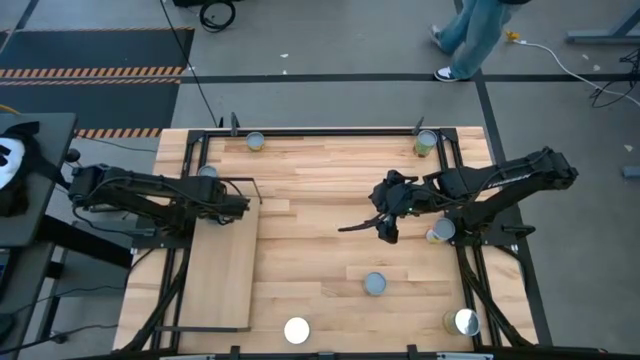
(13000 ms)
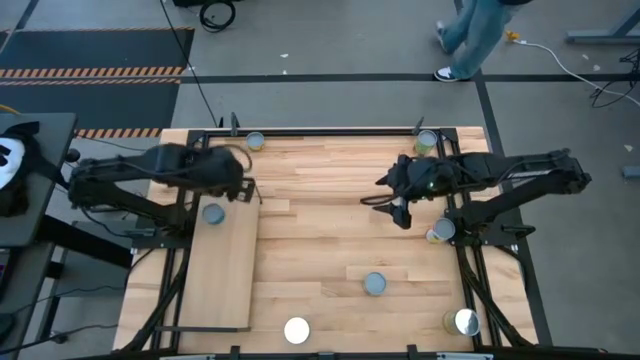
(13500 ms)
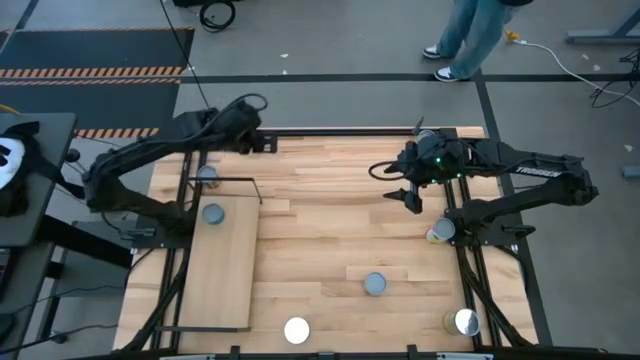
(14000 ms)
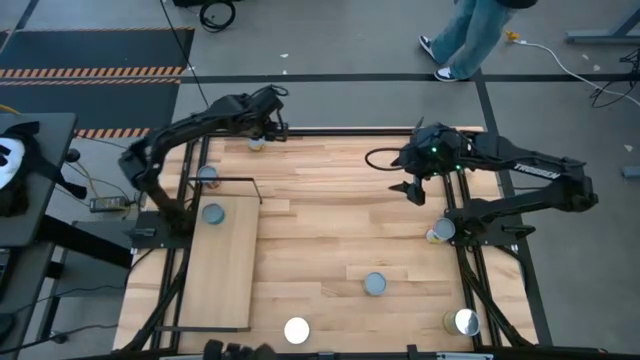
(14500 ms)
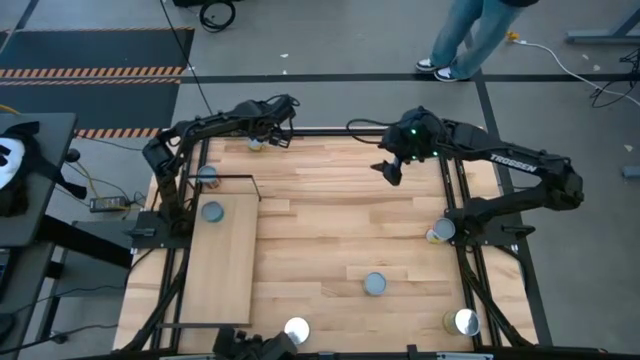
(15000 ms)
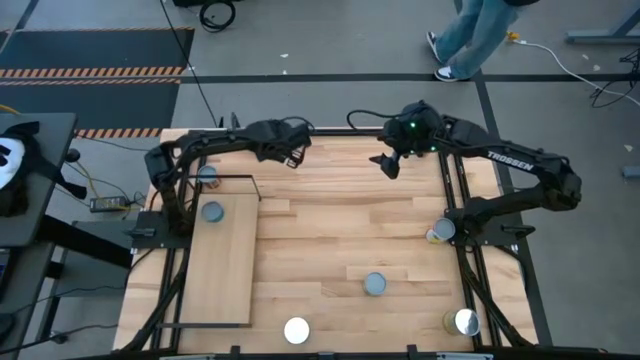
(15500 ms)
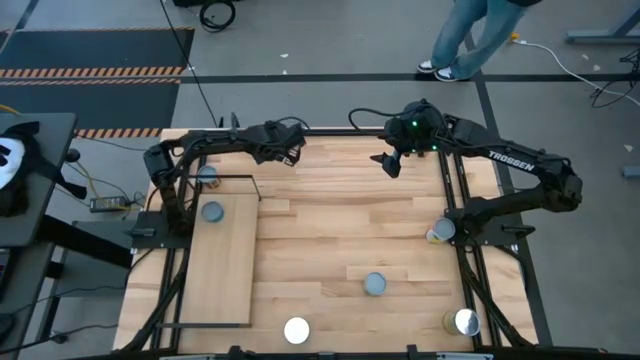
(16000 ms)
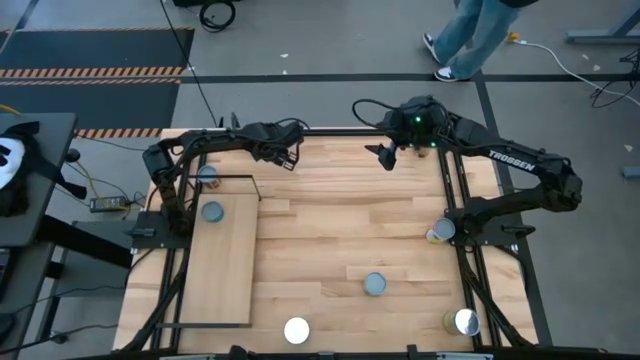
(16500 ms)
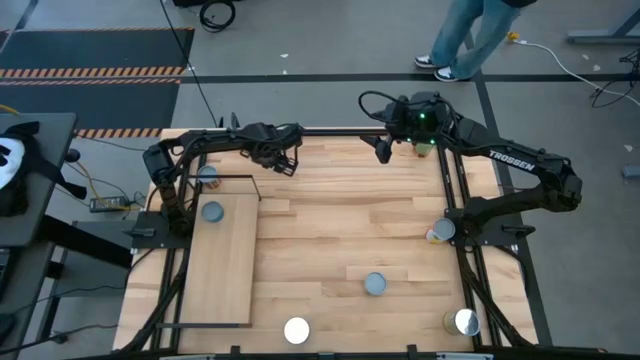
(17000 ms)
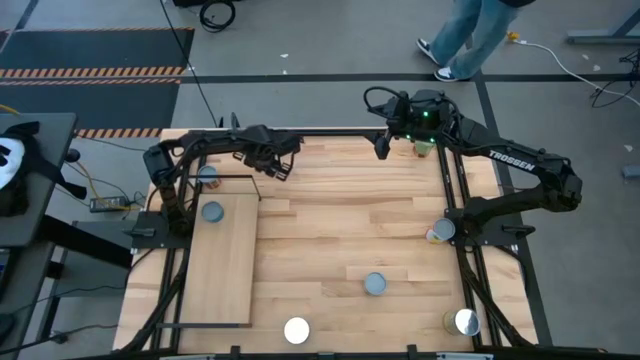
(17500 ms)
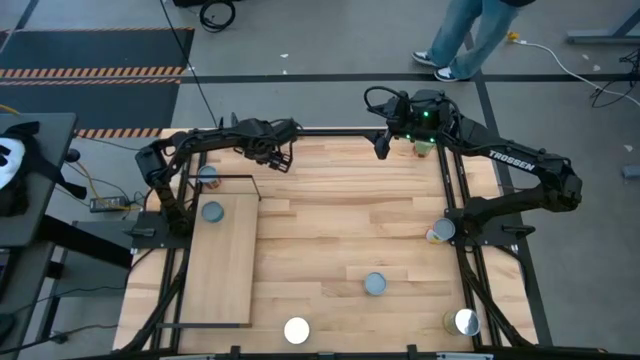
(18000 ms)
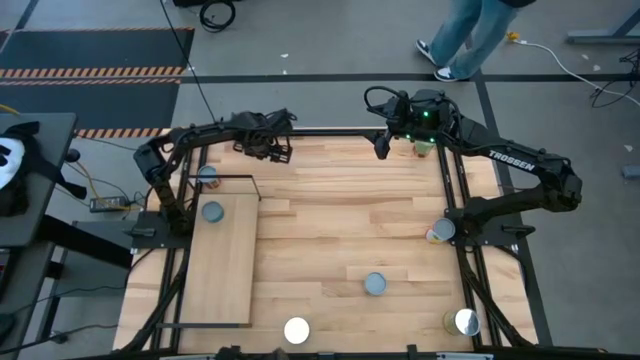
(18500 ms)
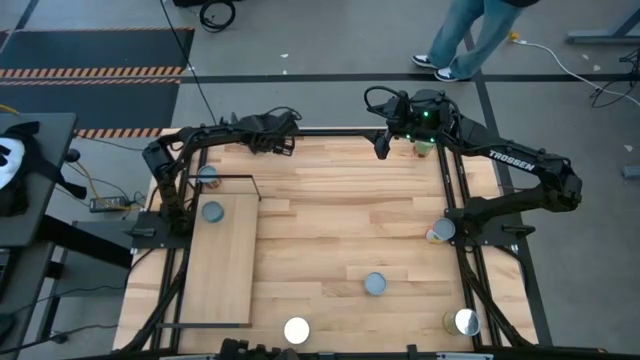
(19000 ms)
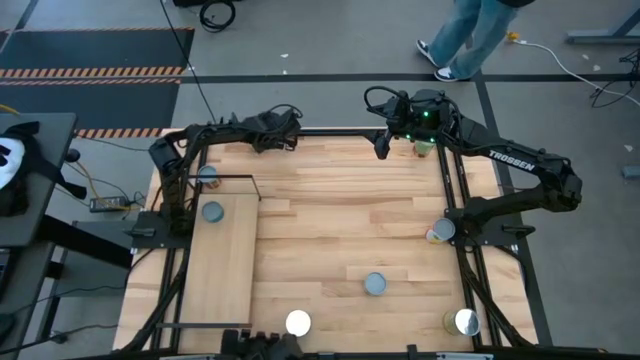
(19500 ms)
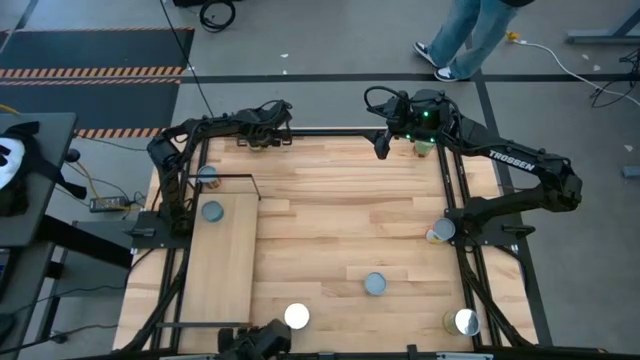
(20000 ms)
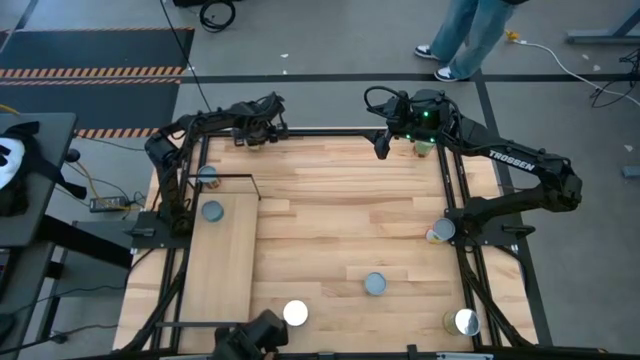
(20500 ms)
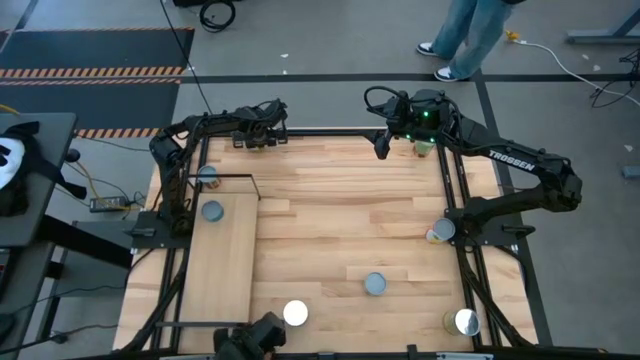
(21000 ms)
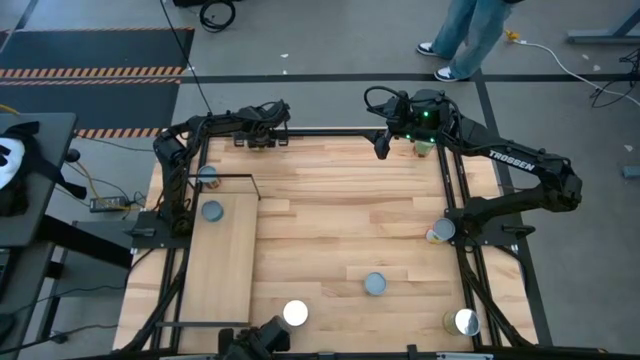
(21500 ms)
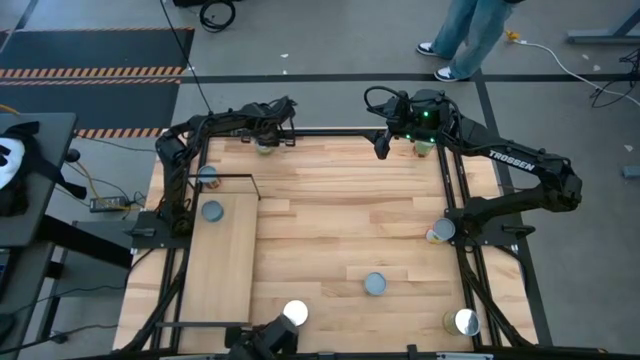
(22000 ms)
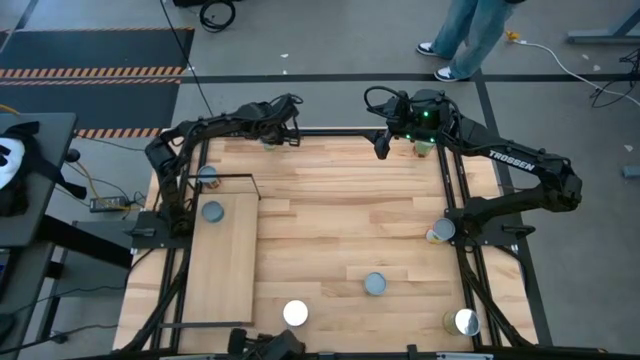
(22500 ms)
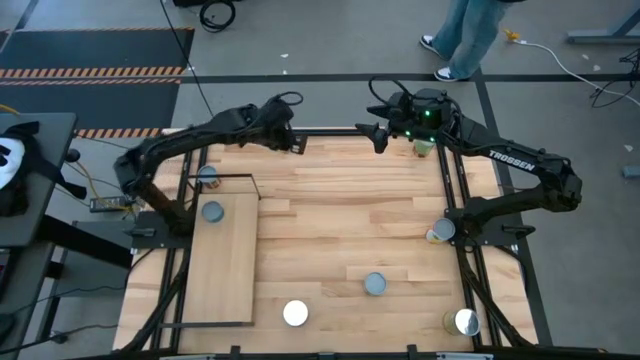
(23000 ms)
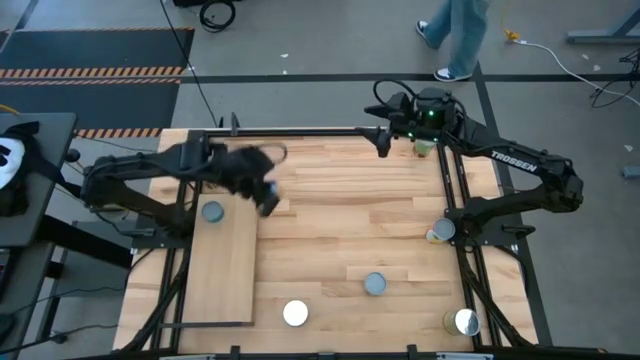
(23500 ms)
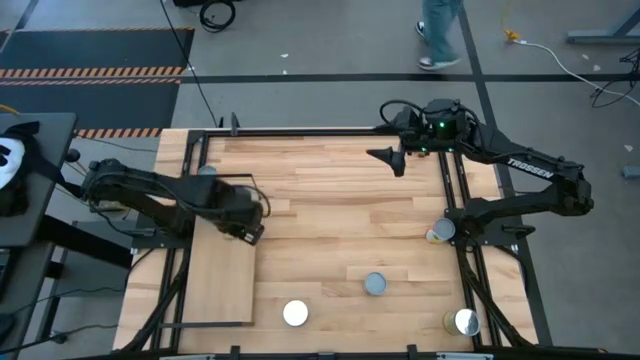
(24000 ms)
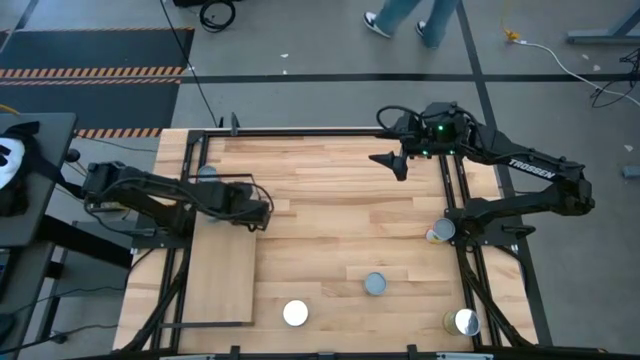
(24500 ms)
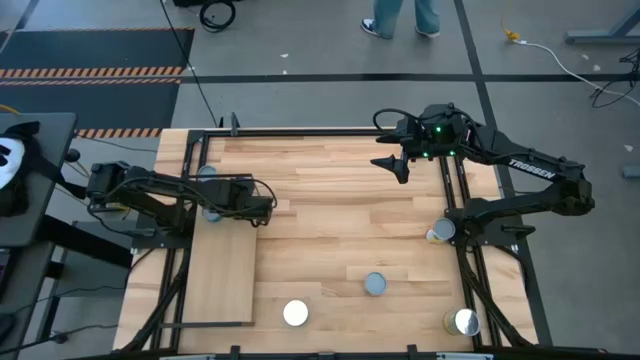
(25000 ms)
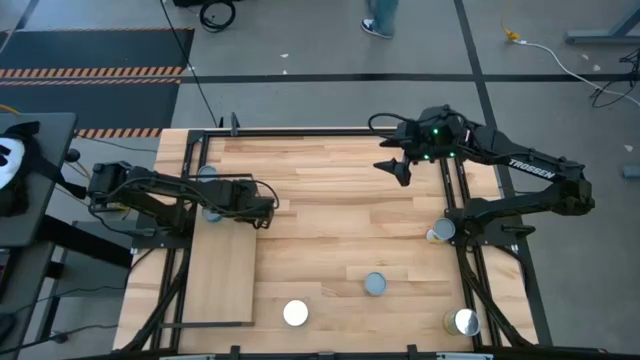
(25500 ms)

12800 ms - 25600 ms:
Task: Pick and place cans onto a shelf
Put the canned mushroom on the shelf

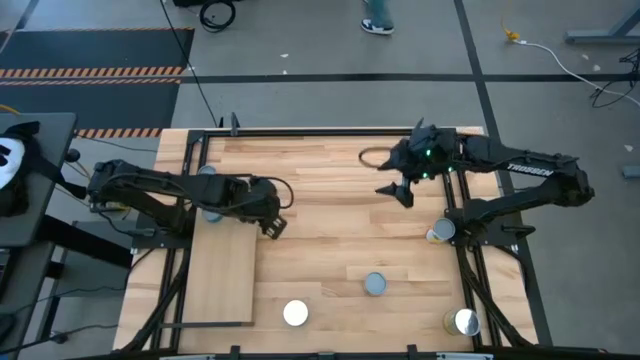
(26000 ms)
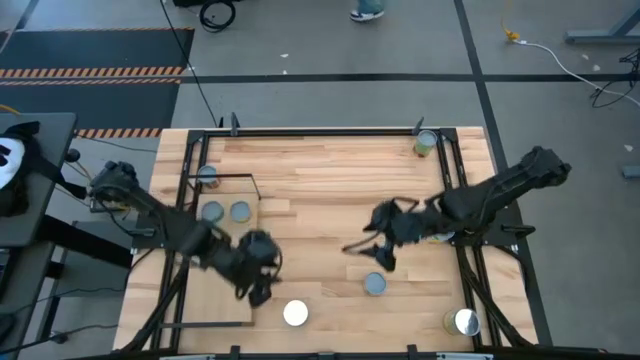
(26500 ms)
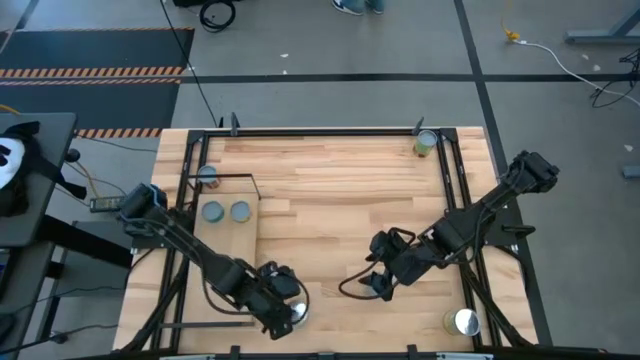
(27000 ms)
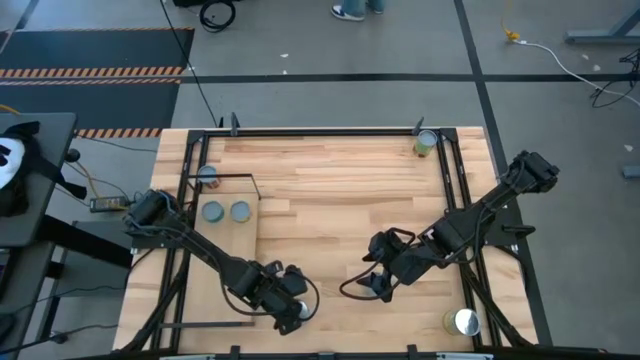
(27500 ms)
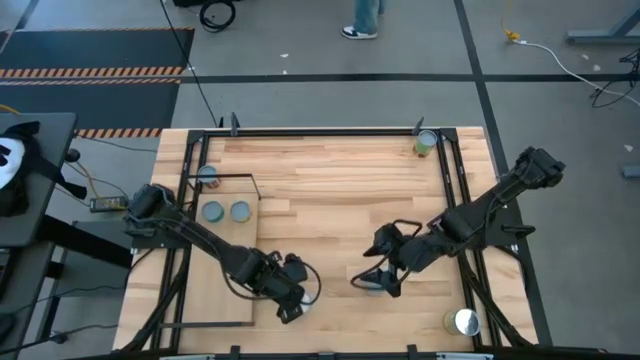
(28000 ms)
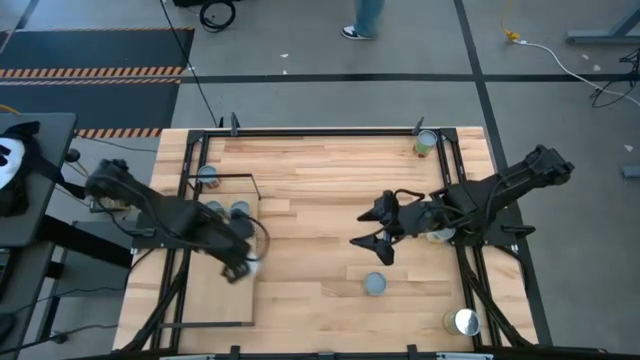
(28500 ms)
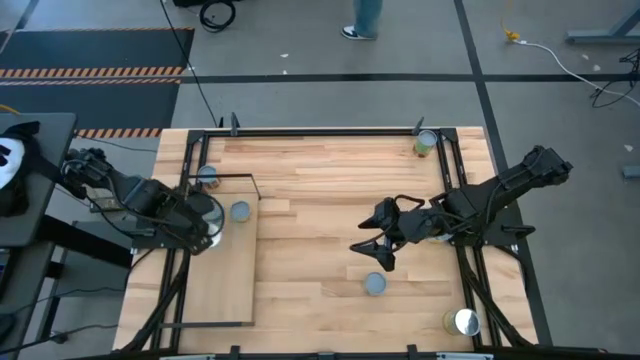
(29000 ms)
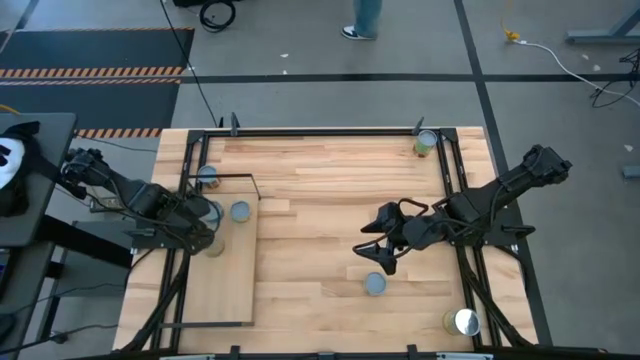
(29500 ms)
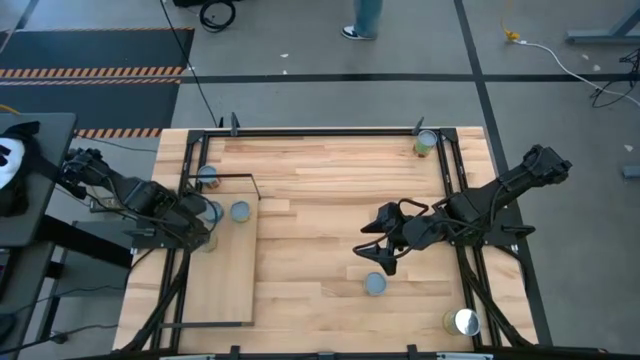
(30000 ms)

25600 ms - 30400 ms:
Put the canned oranges on the shelf
